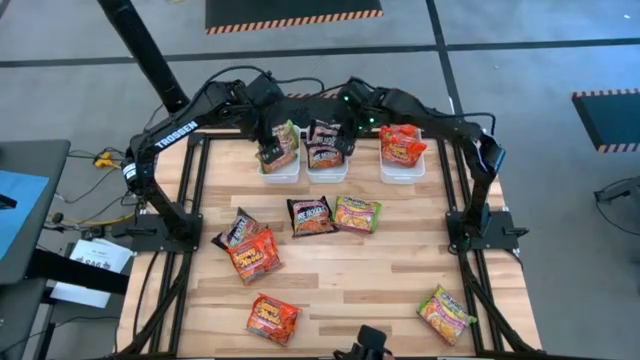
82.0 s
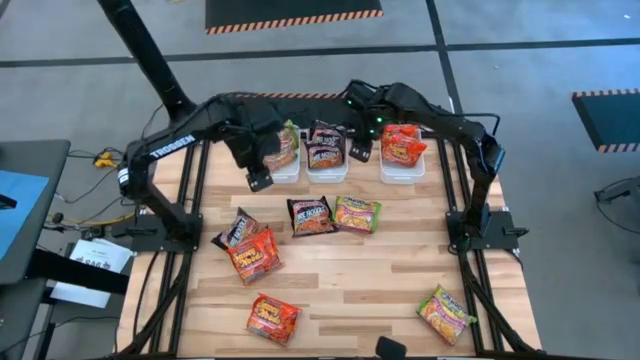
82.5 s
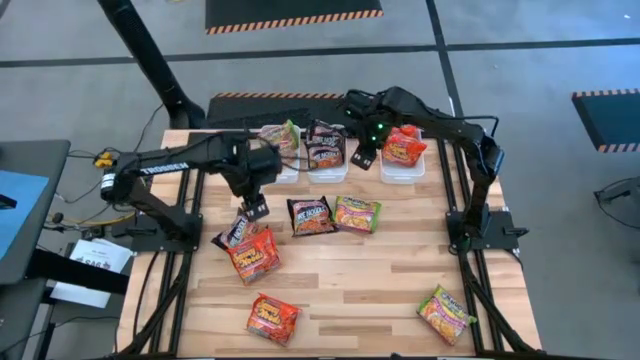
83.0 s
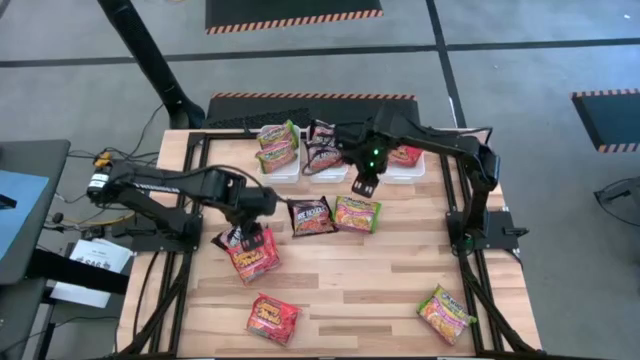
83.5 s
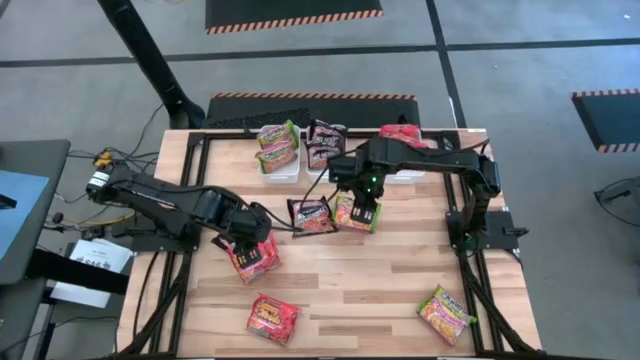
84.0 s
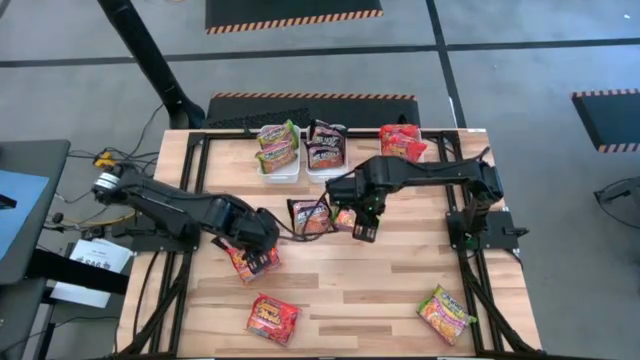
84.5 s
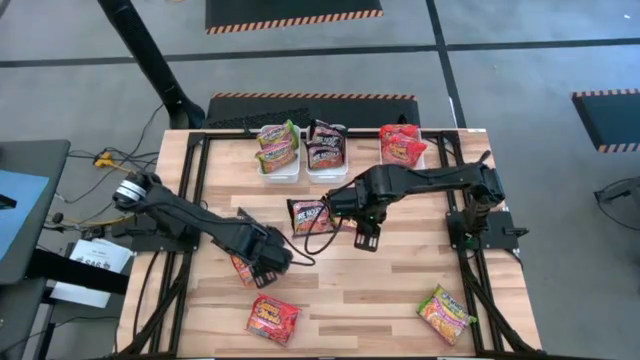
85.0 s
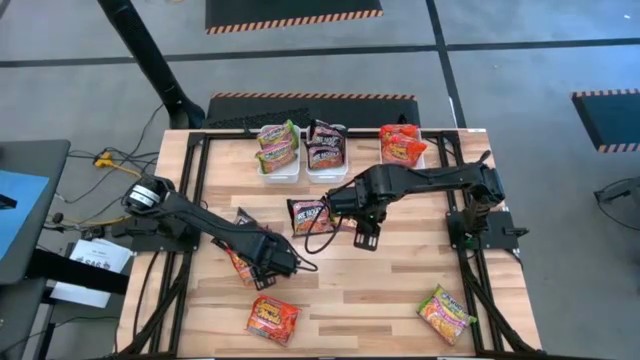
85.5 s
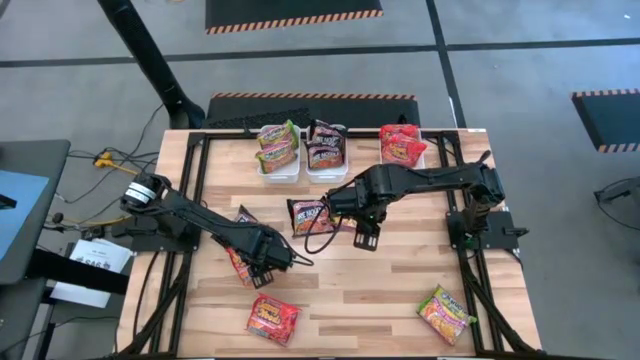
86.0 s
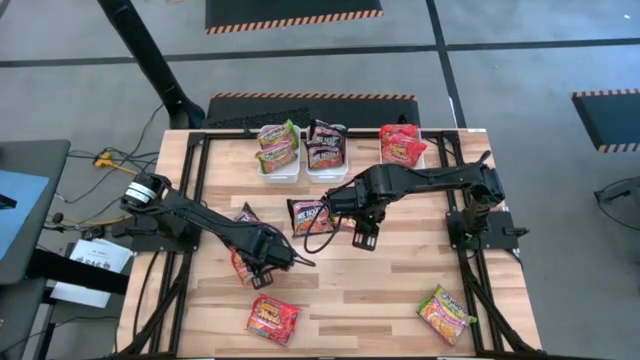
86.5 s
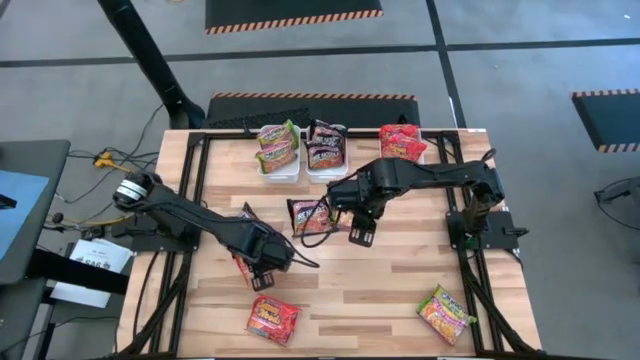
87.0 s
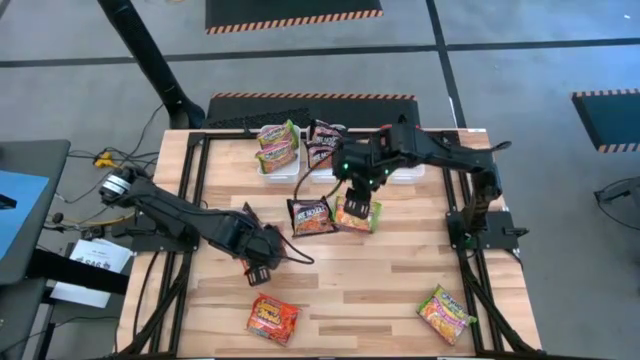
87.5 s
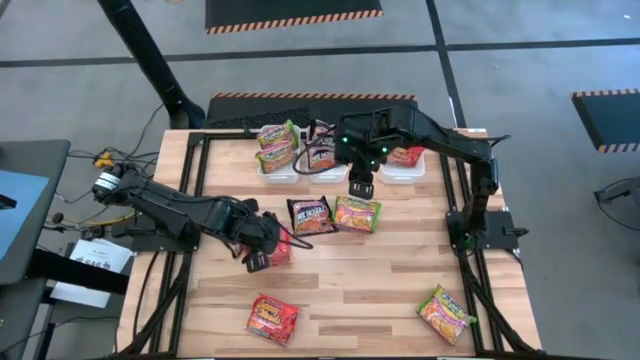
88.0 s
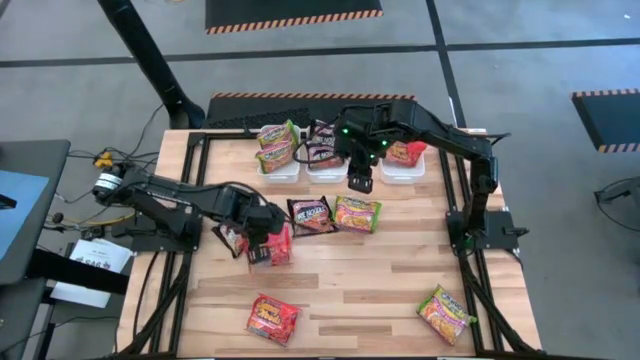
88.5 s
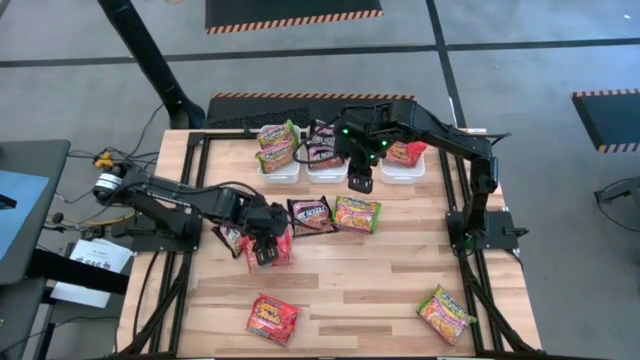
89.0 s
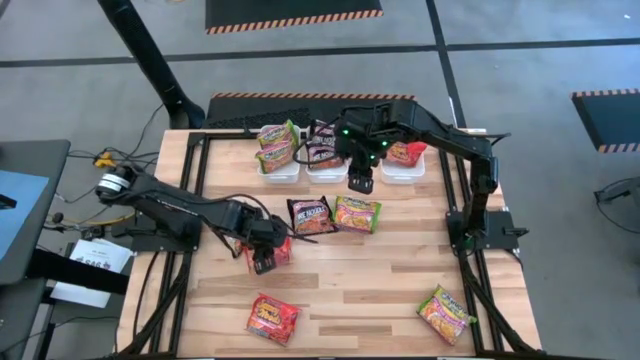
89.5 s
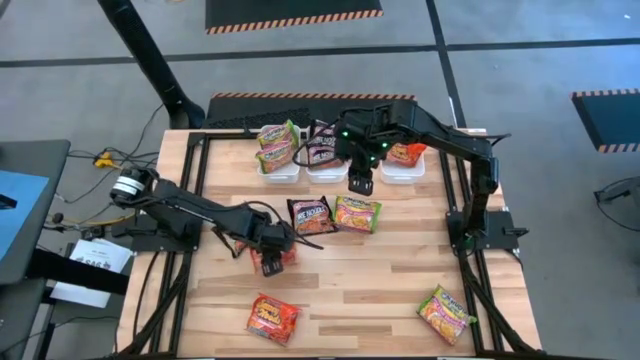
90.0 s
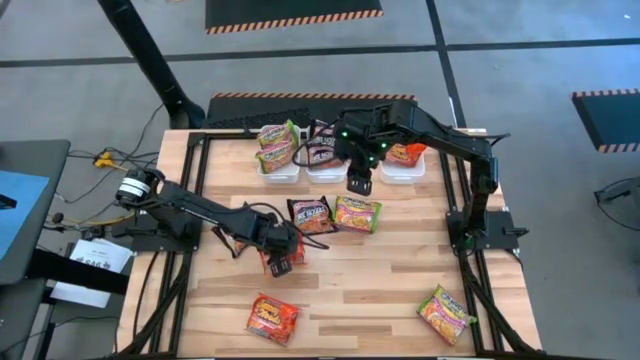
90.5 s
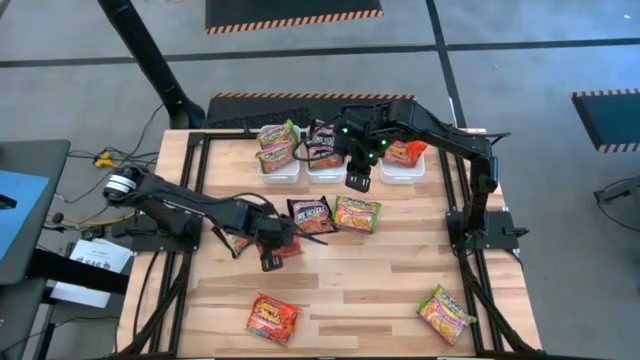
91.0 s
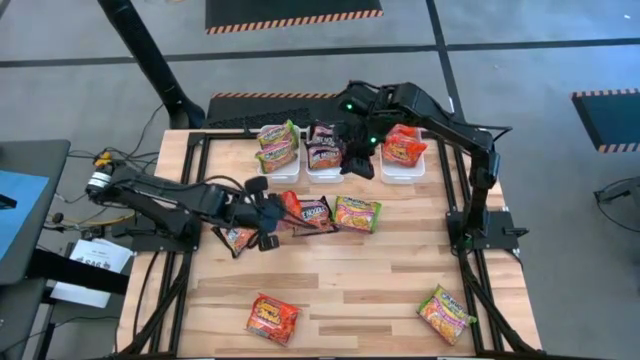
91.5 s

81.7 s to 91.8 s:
Task: Sort Maruchan noodles
Put the orange noodle pack into the right white bin

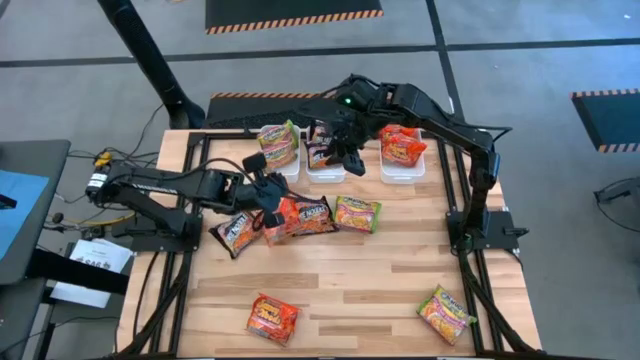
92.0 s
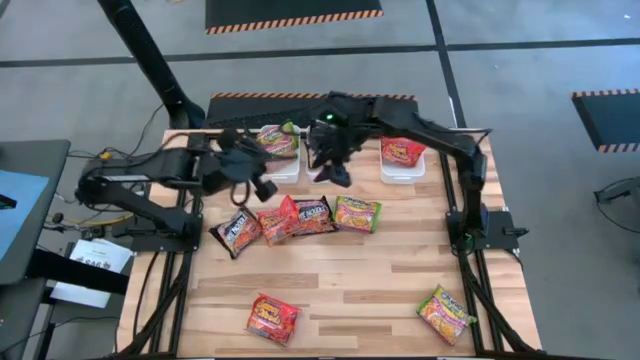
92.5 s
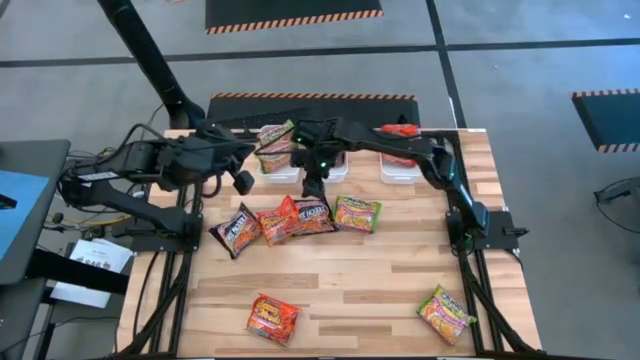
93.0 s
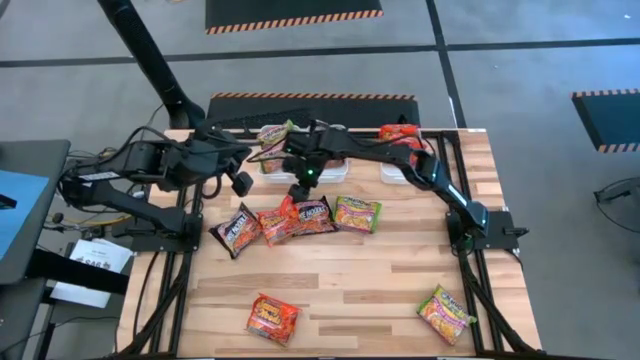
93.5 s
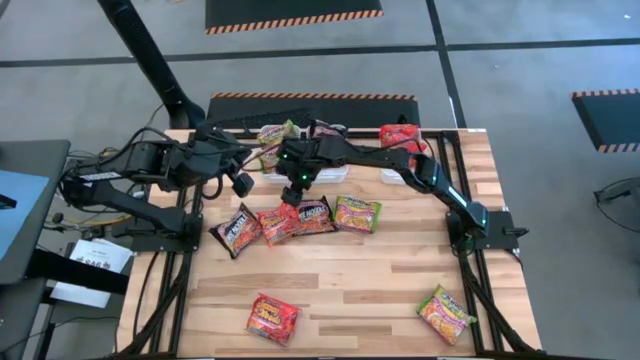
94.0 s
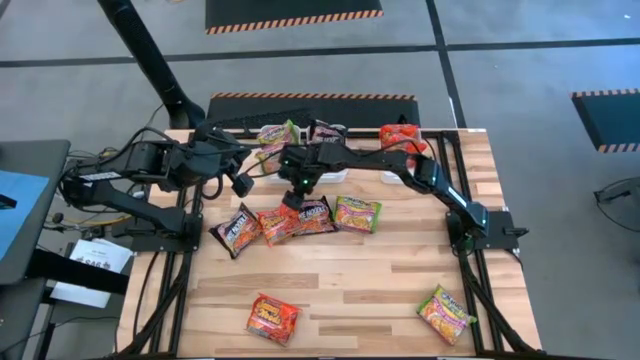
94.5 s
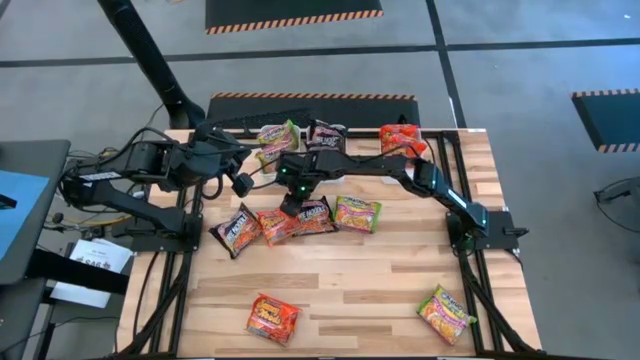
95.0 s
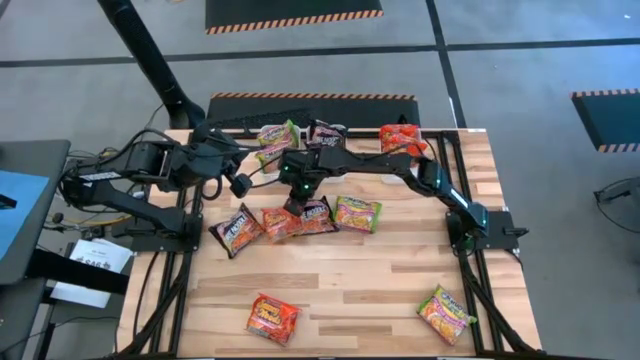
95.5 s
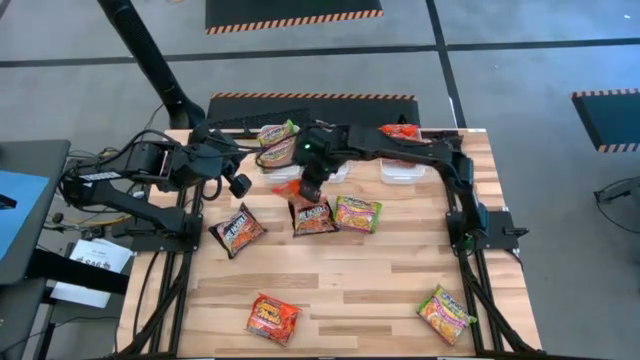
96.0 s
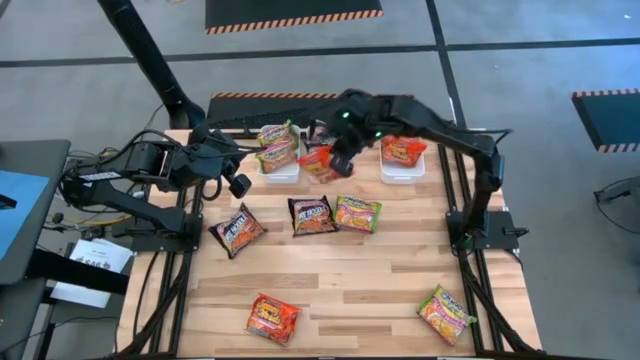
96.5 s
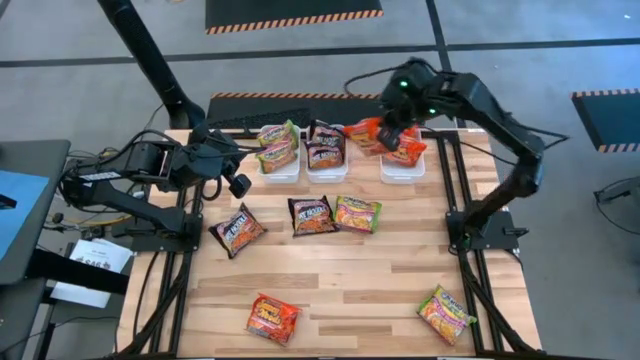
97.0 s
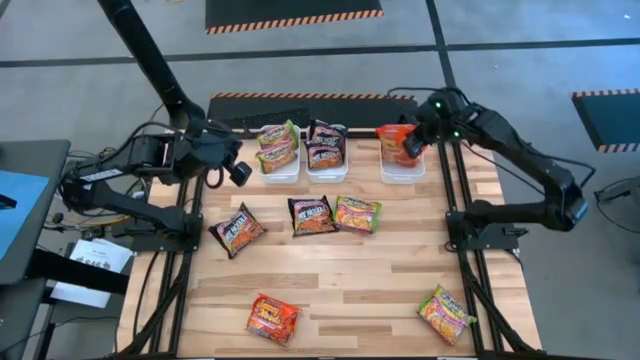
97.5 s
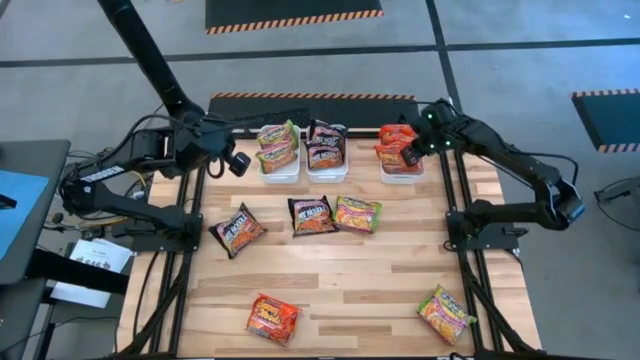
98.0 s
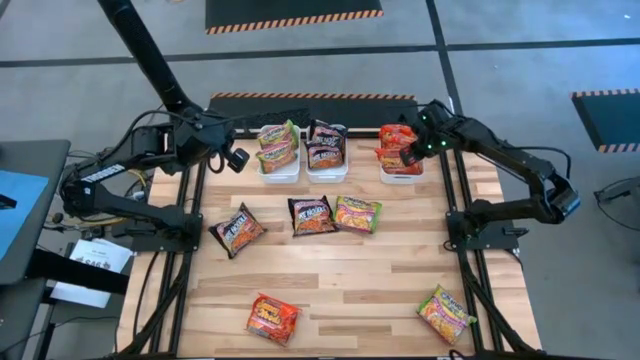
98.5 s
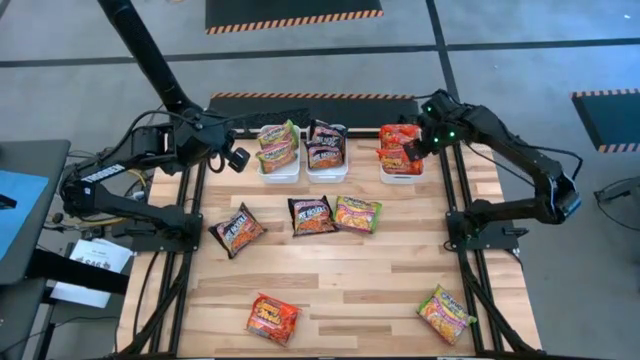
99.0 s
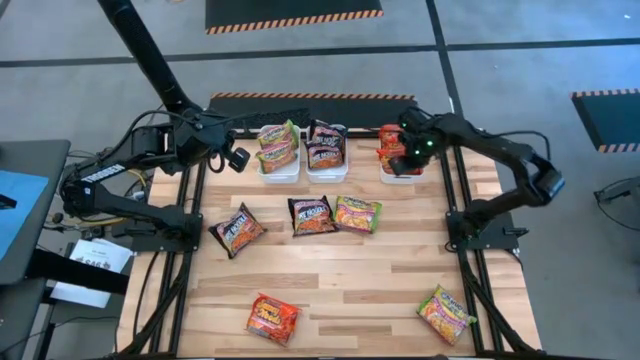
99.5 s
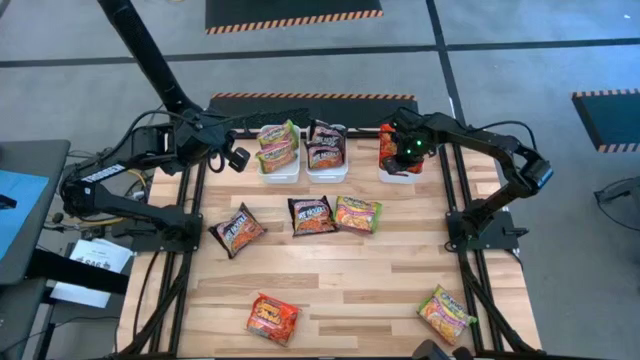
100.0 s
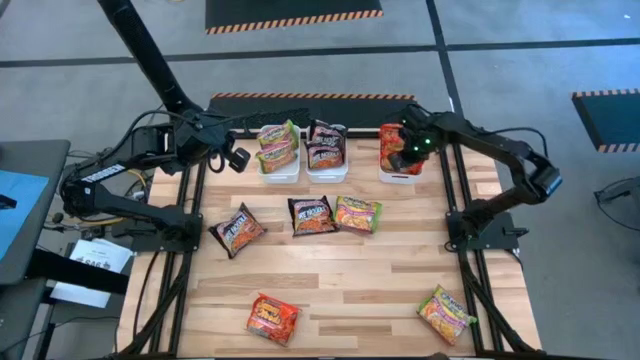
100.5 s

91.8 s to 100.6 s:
Put the orange noodle pack into the right white bin

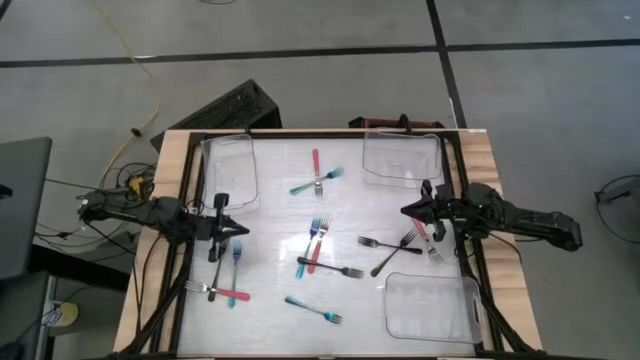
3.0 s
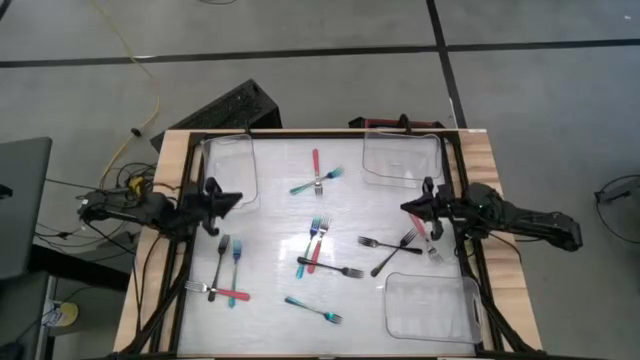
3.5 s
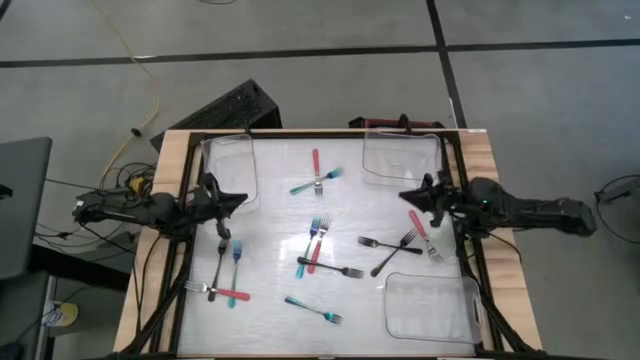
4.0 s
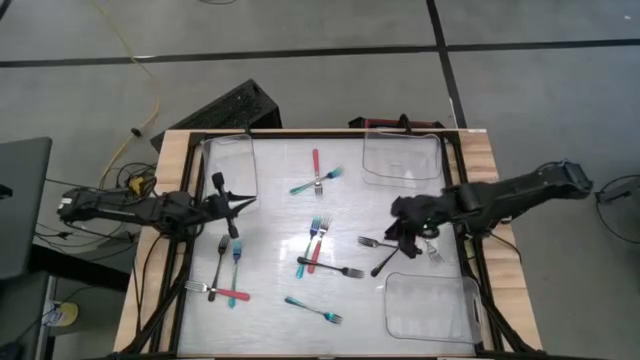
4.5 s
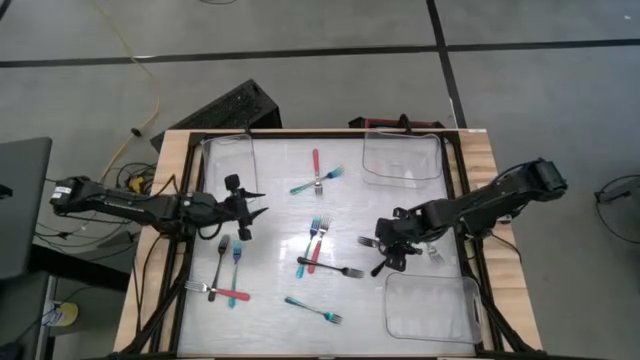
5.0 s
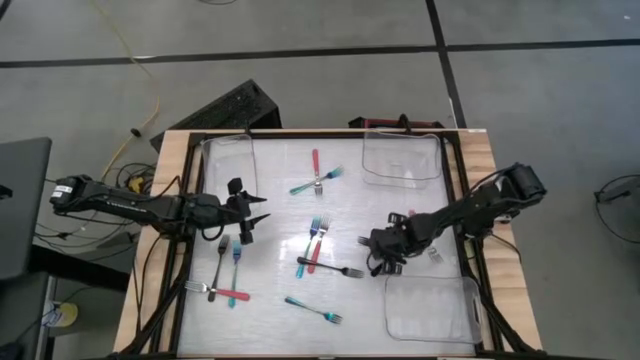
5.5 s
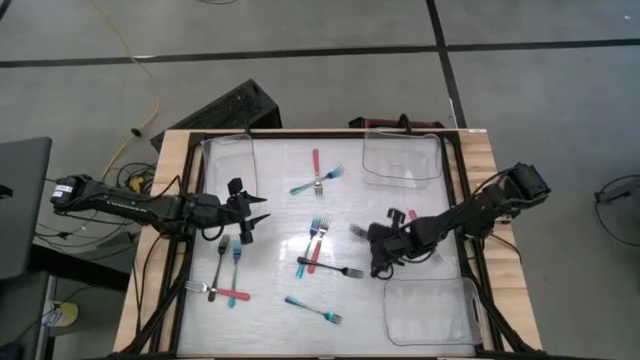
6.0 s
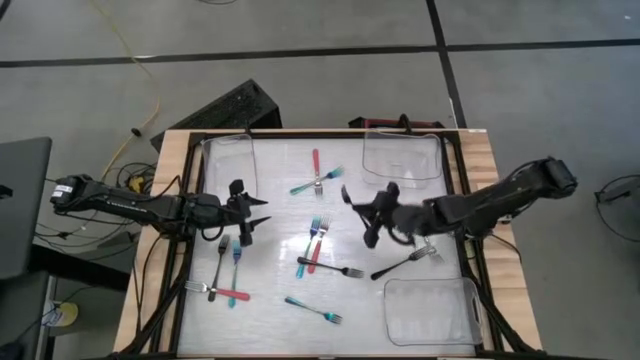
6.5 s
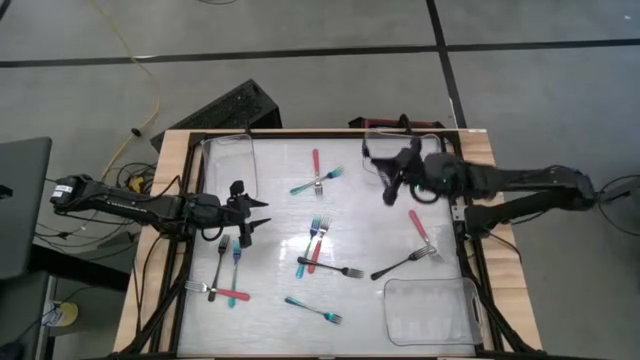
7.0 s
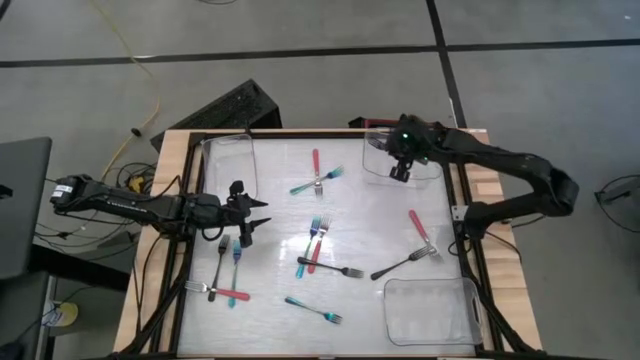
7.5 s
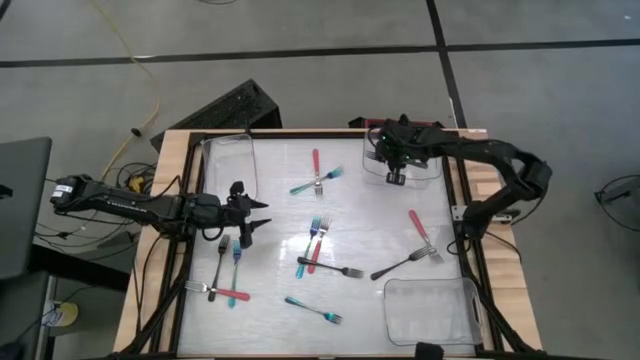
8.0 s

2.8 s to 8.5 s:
Task: Sort silverware by color (type)
Put the black fork into the top right transparent bin
